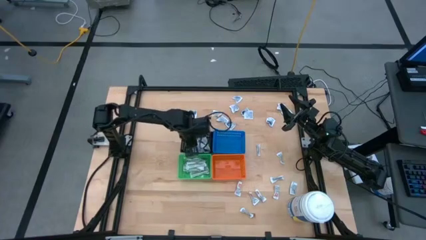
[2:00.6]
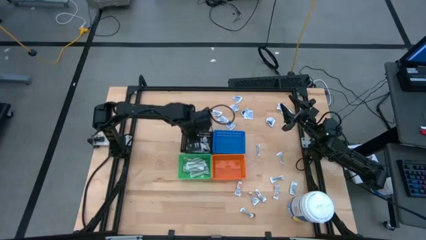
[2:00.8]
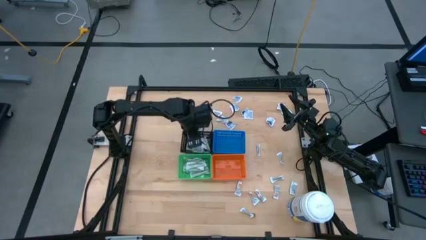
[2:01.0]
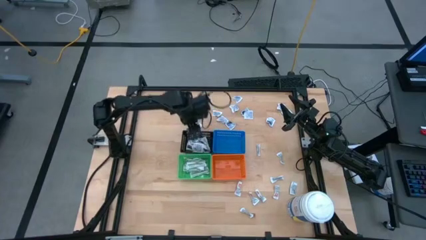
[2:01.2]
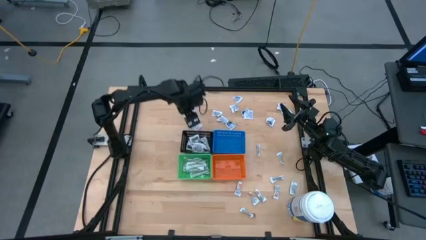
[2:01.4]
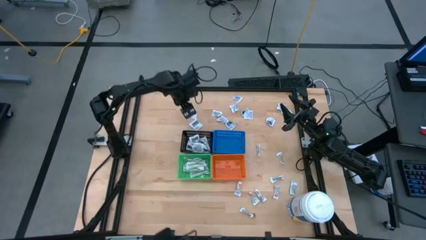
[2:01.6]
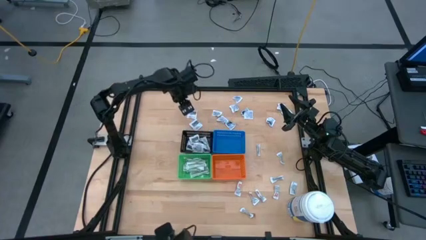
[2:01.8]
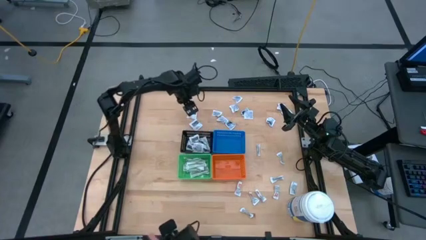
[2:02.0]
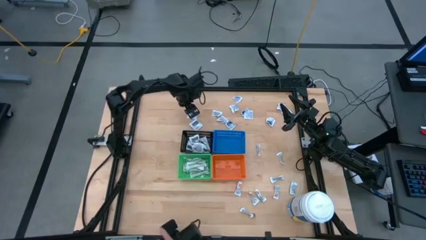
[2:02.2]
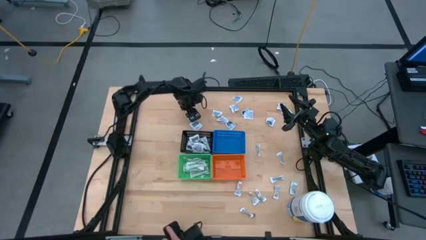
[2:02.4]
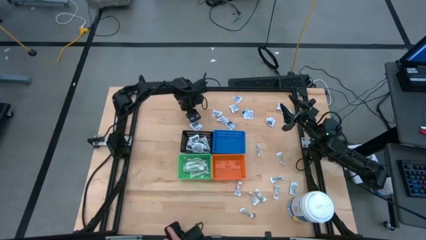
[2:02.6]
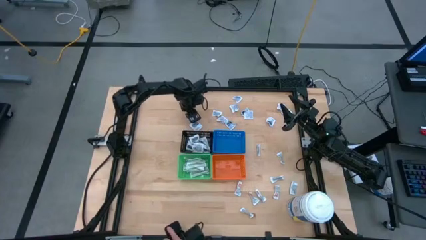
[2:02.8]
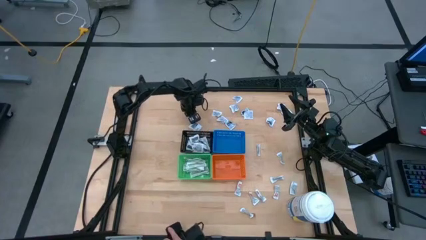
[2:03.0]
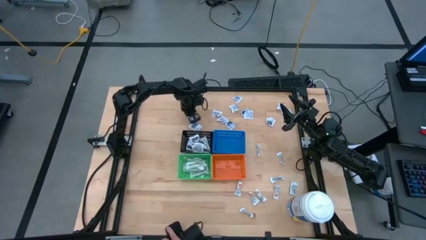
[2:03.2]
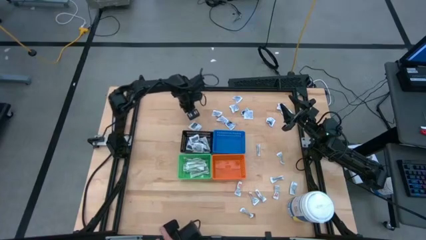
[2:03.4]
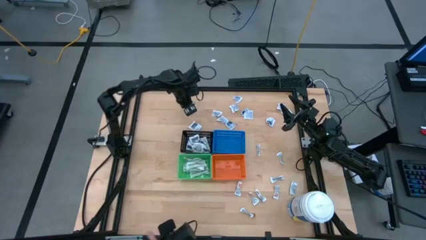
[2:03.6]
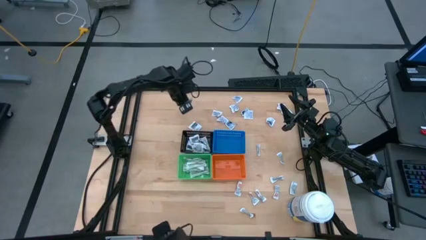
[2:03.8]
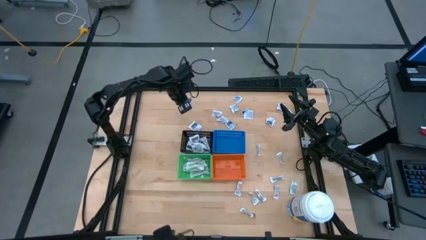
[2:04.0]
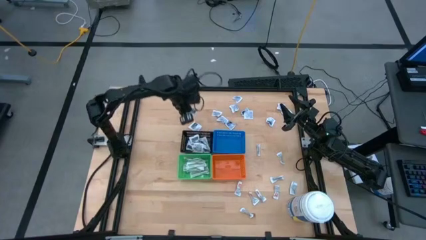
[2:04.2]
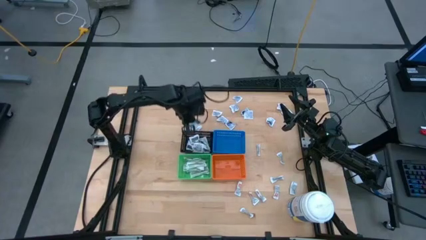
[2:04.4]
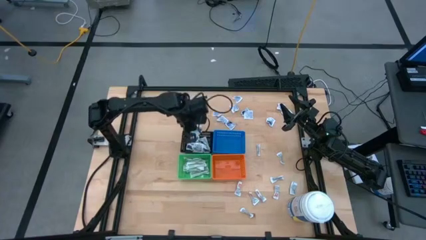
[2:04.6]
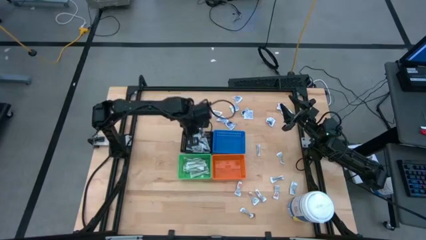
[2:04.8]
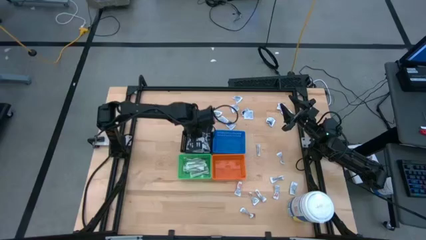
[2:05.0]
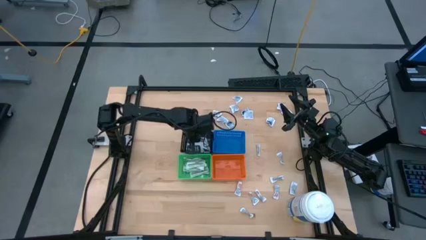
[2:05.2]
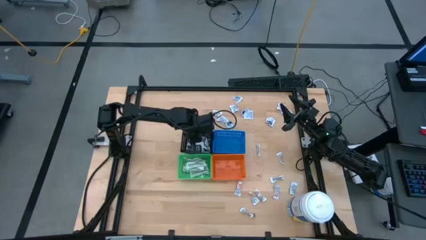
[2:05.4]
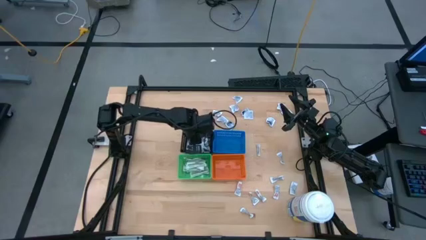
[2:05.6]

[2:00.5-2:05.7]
Task: Pick & Place First Aid Supplies
Put the towelette pack into the black bin

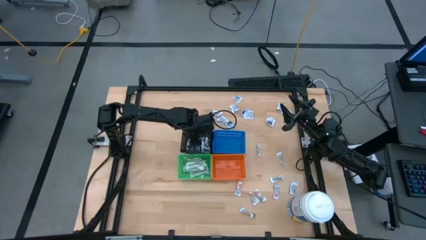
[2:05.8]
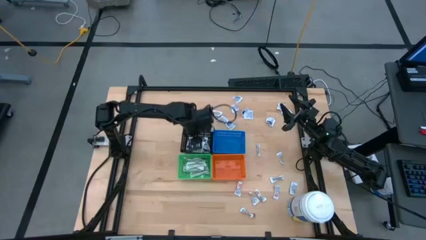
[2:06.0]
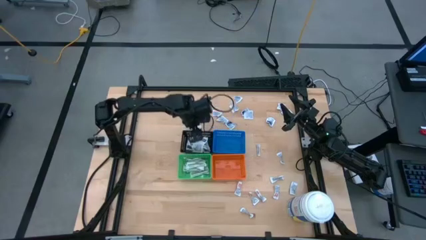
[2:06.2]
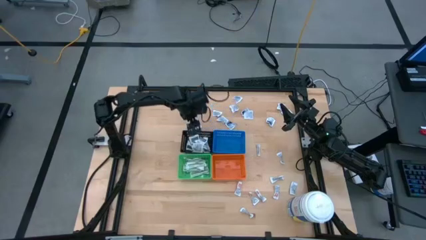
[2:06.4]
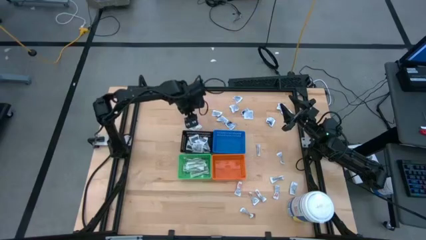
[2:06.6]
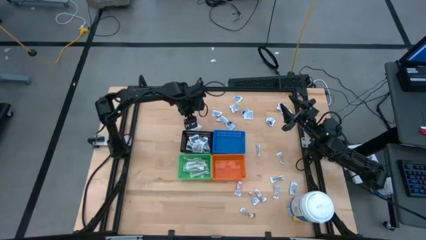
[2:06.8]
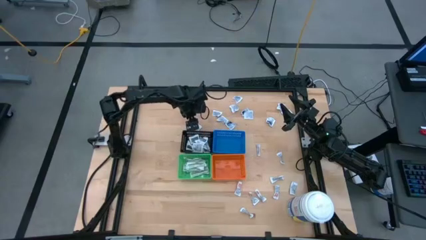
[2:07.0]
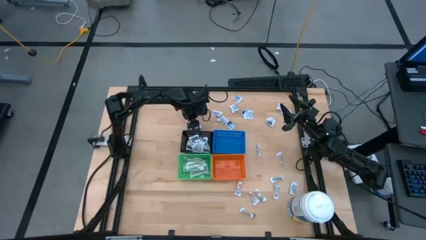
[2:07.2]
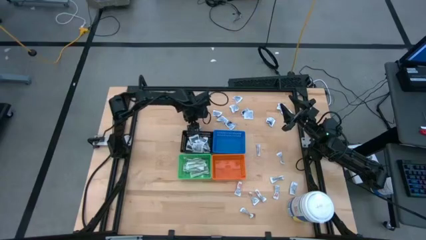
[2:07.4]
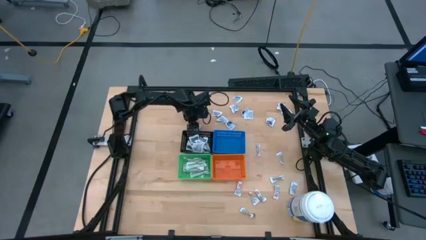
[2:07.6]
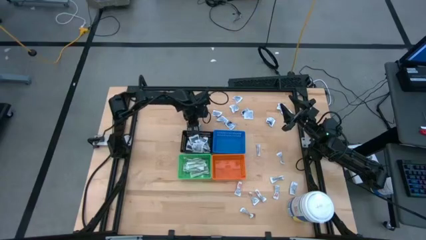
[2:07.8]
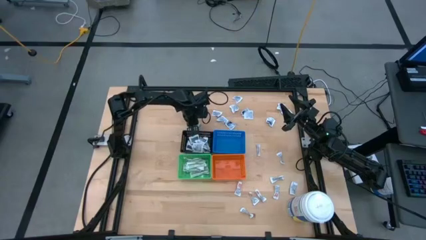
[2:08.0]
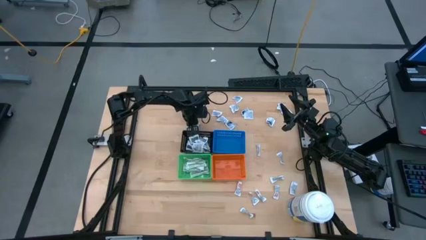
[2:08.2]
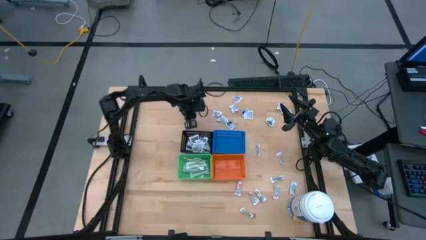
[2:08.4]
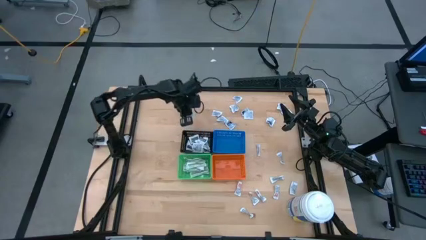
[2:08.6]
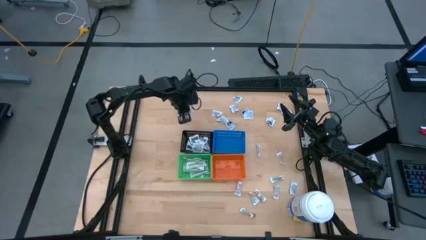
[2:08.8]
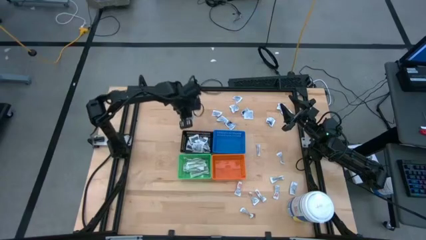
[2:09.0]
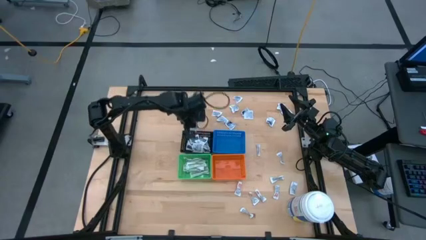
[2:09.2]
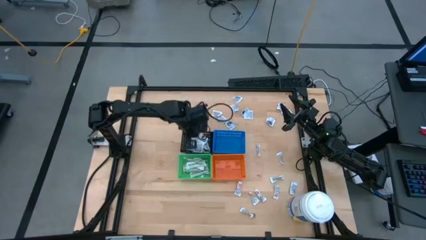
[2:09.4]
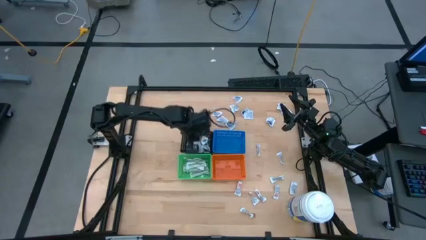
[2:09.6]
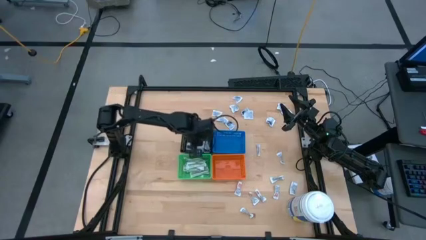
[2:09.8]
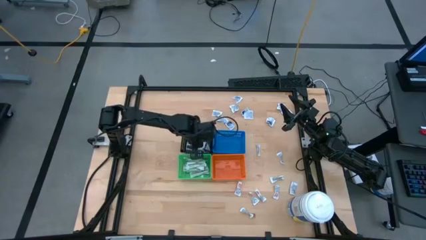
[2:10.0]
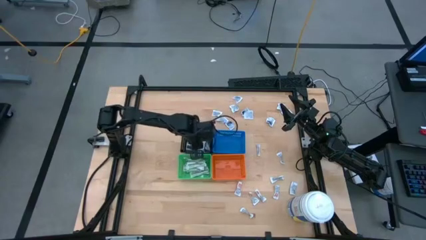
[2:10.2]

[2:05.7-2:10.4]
Put the towelette pack into the black bin

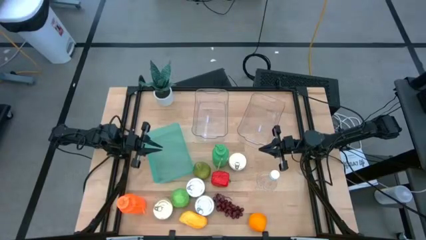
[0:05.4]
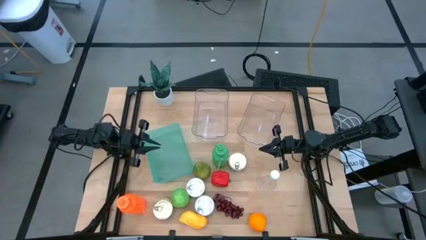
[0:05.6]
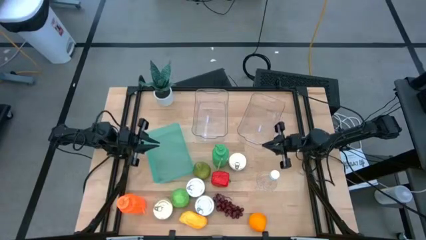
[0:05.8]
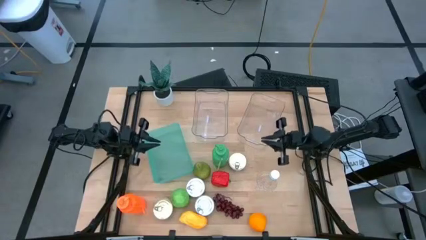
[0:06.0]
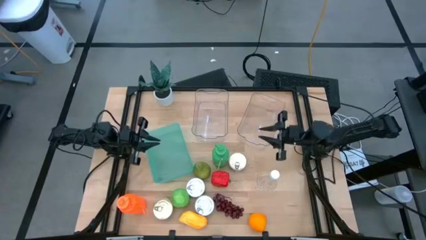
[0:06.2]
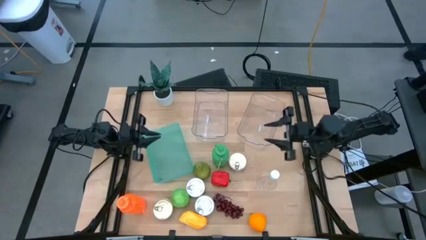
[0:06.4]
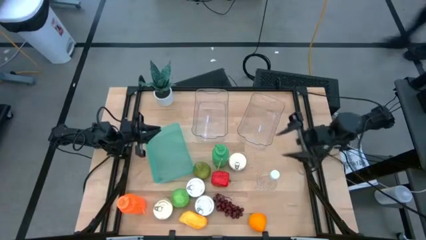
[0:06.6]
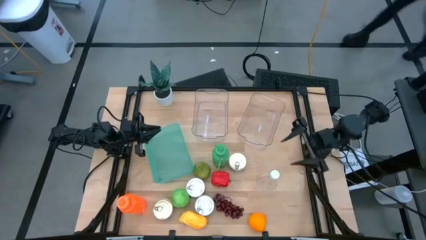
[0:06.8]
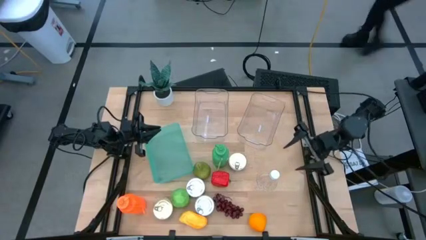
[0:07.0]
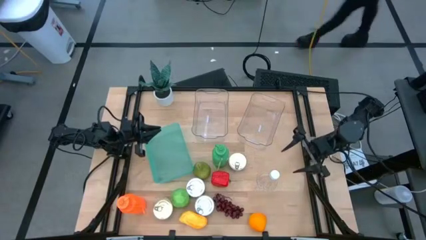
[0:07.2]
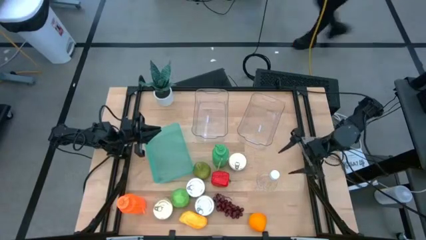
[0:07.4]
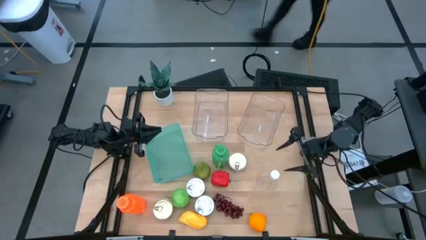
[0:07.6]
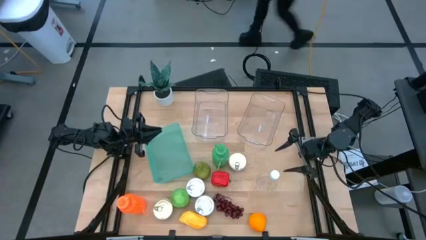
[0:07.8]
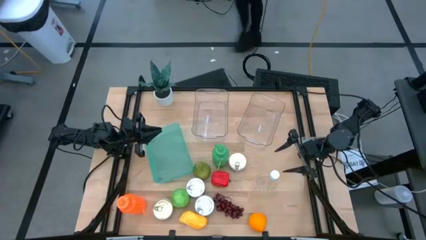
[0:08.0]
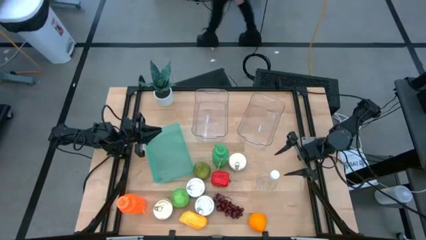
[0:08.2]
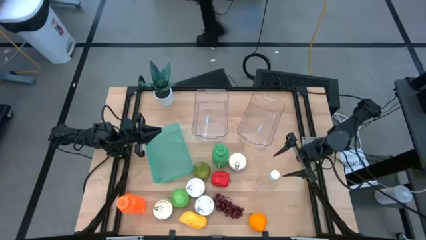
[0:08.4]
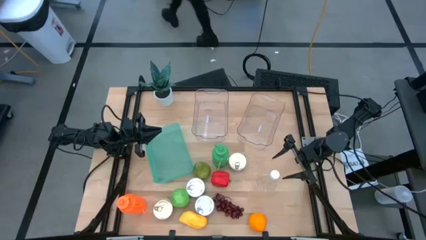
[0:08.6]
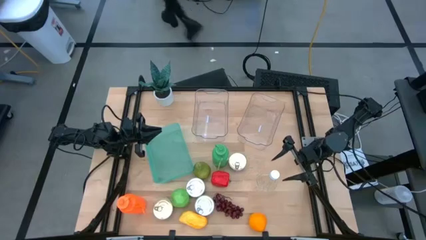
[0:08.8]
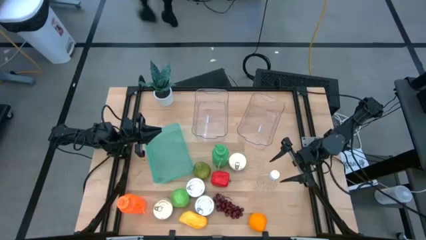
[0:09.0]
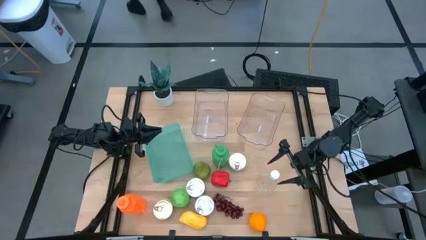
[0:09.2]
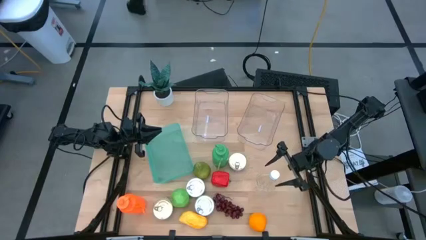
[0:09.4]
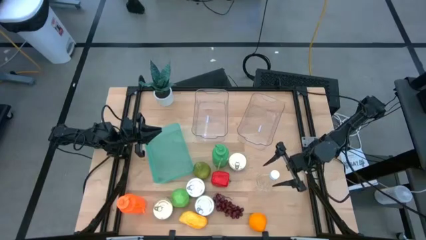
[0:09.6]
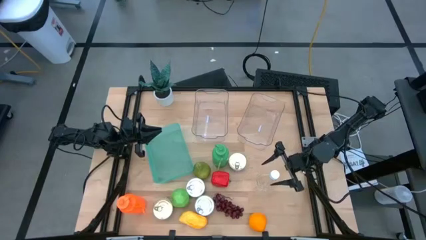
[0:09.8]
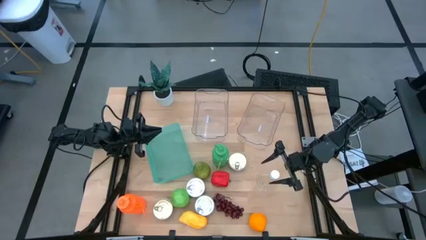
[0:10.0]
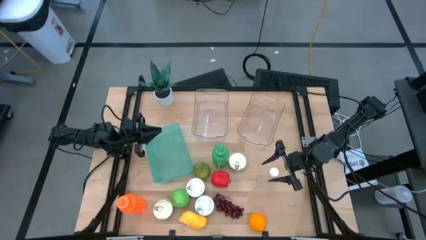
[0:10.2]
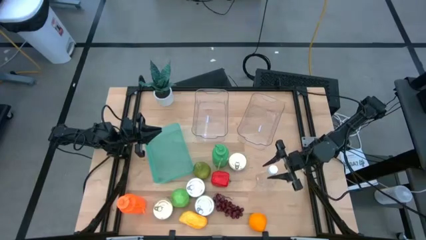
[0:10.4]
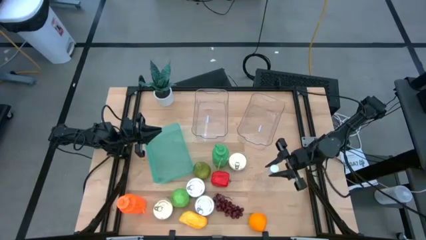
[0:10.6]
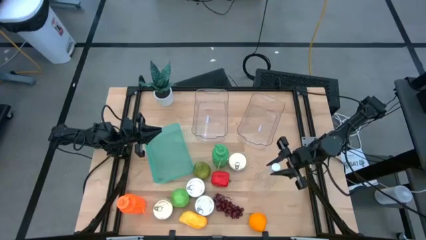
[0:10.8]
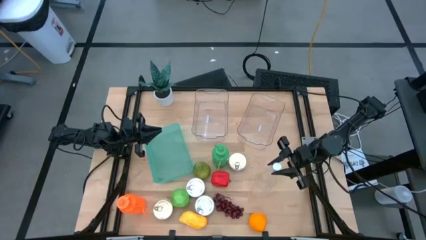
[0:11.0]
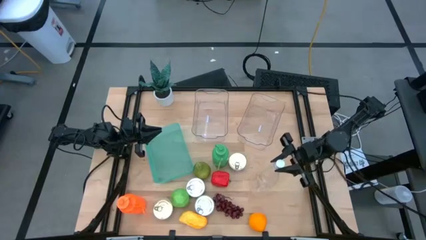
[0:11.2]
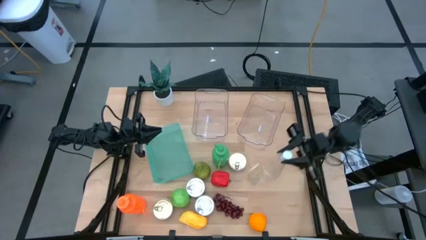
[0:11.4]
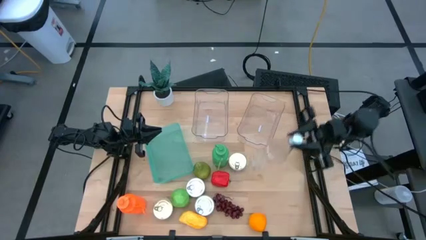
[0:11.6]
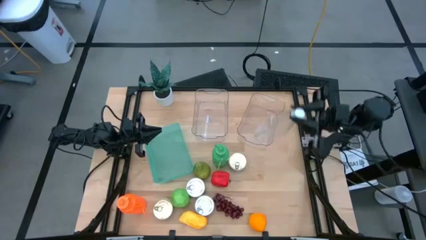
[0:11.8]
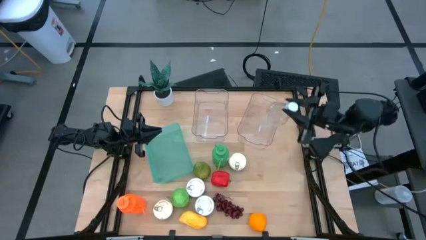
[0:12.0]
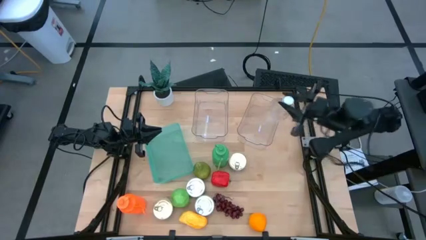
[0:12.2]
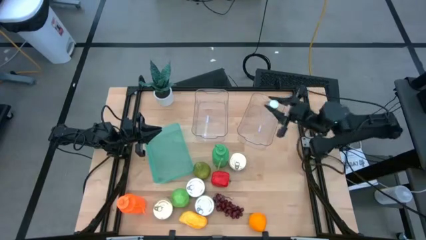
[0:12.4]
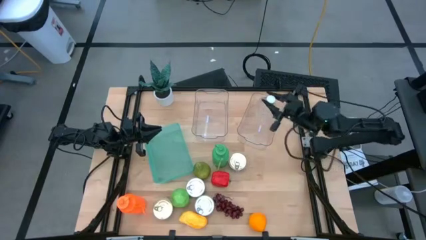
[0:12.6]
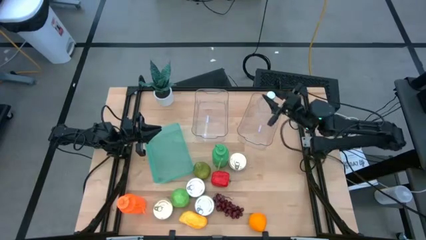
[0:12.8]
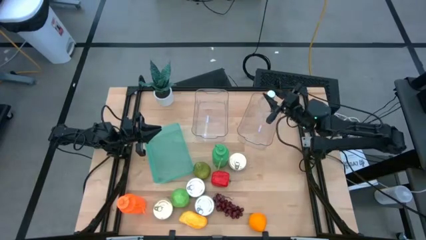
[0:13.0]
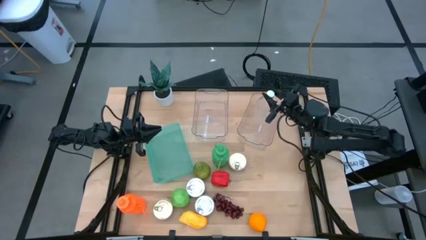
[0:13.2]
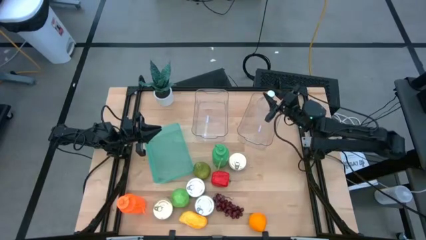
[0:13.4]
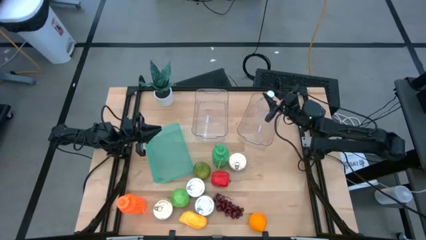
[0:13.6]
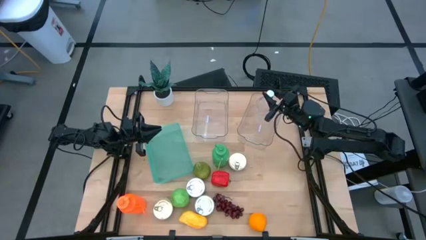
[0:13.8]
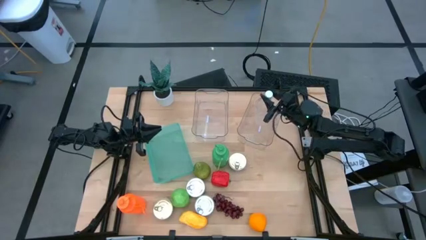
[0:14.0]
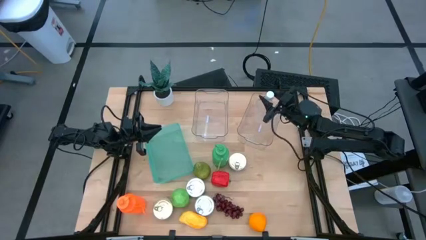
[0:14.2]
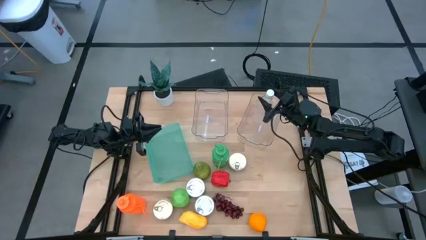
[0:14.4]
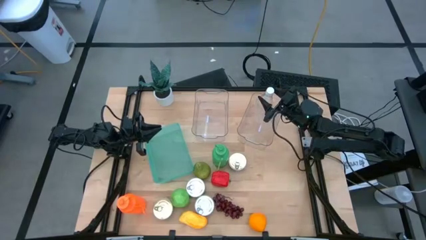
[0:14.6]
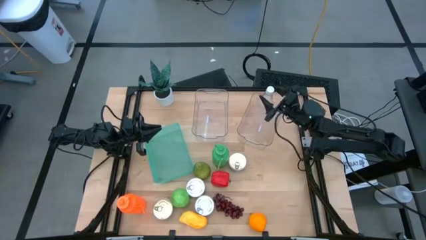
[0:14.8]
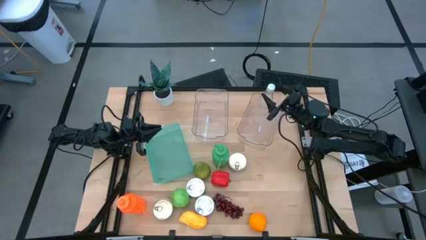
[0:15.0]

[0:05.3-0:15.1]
Task: Pick & Place Food Item
Put the transparent water bottle into the right transparent bin
